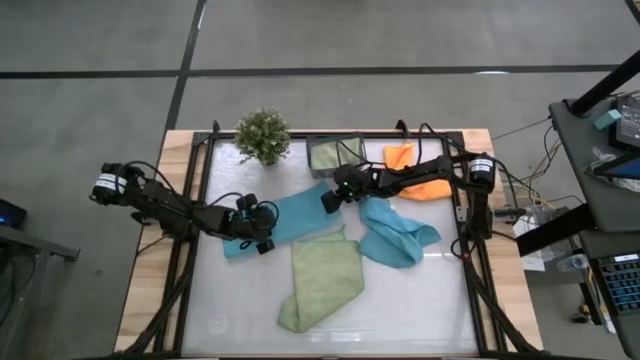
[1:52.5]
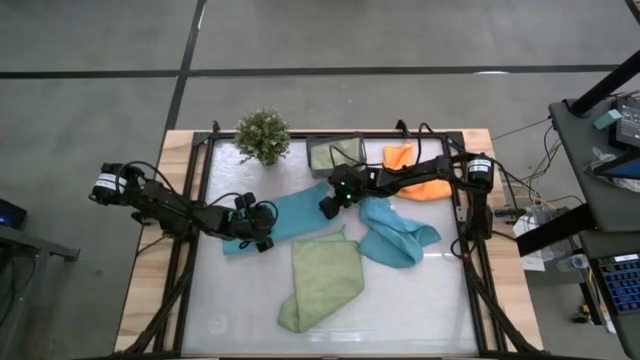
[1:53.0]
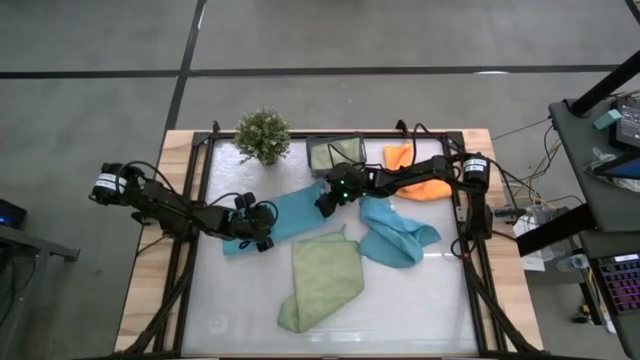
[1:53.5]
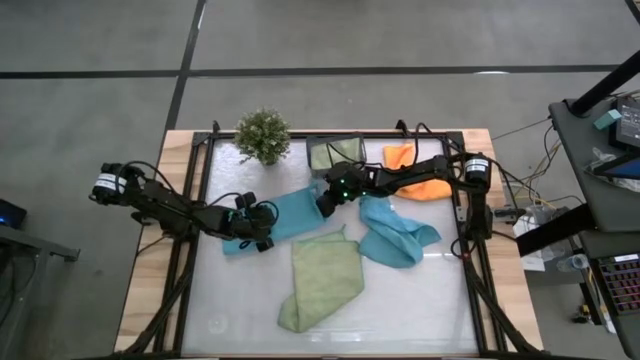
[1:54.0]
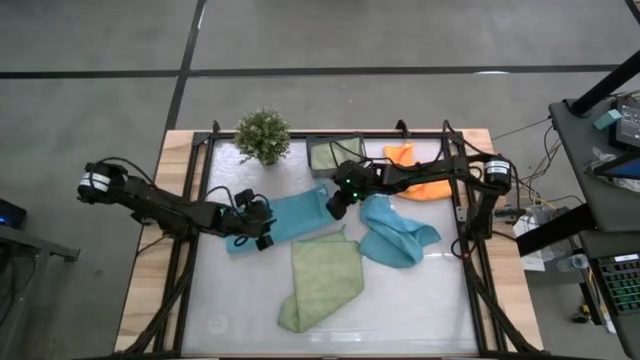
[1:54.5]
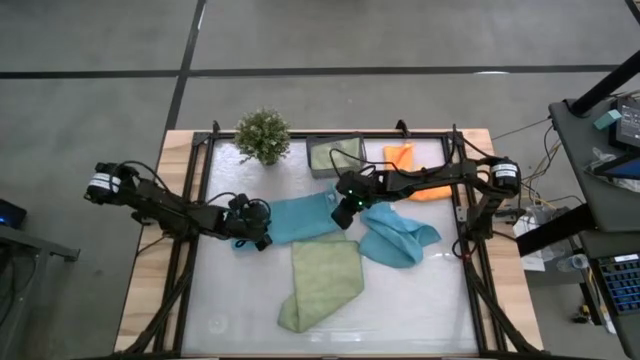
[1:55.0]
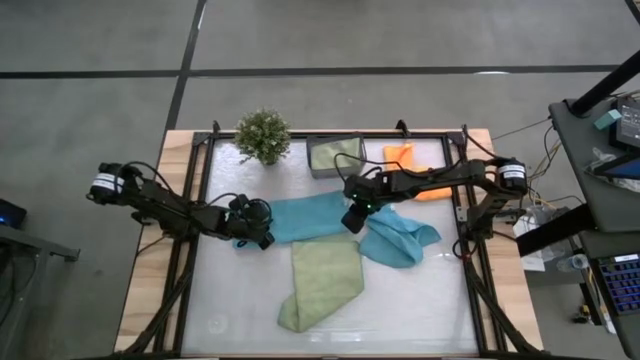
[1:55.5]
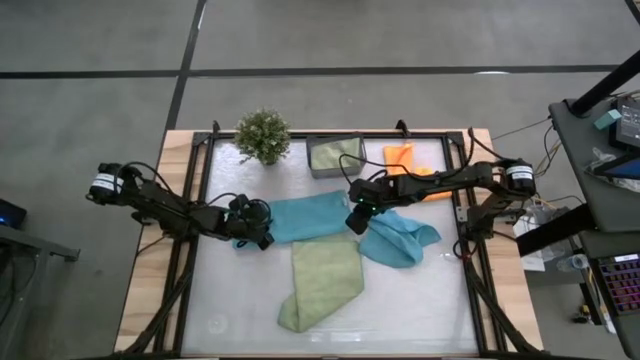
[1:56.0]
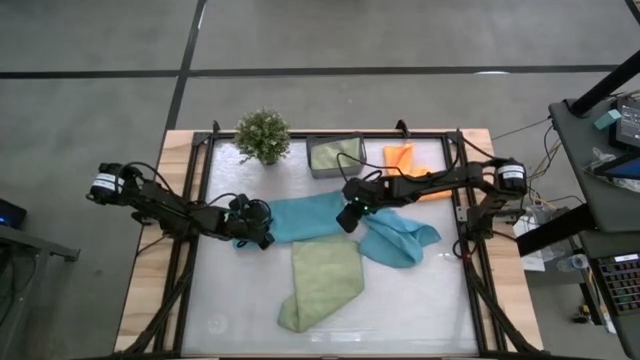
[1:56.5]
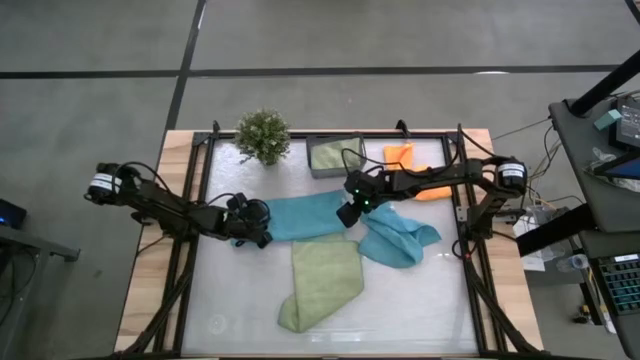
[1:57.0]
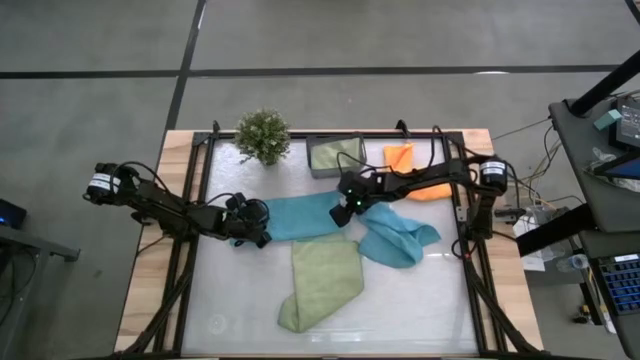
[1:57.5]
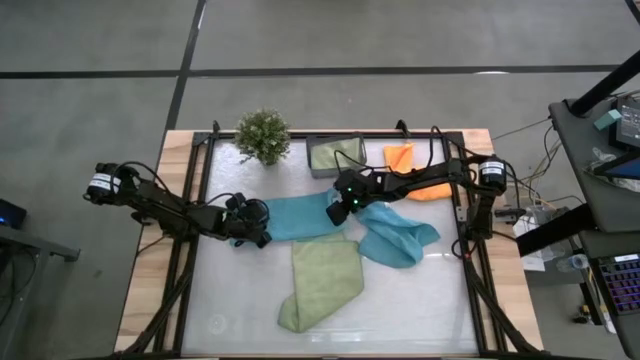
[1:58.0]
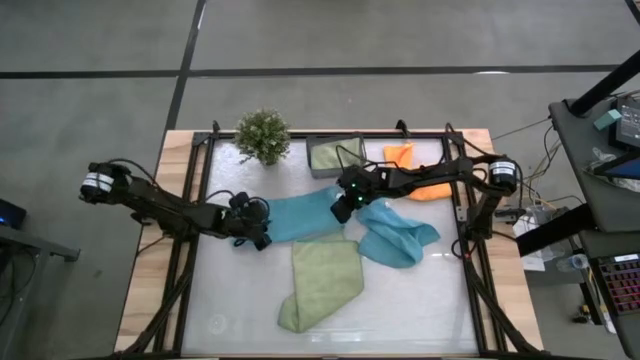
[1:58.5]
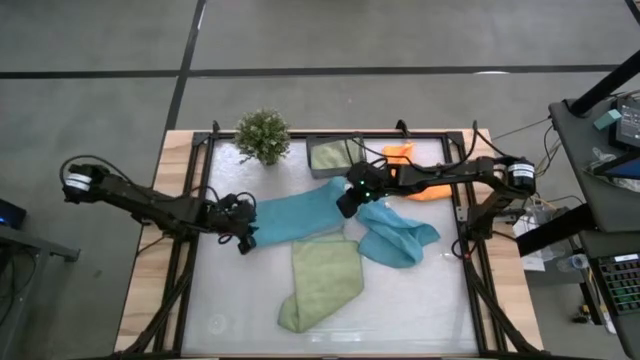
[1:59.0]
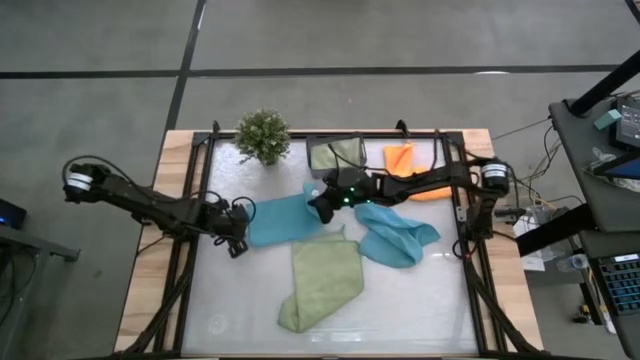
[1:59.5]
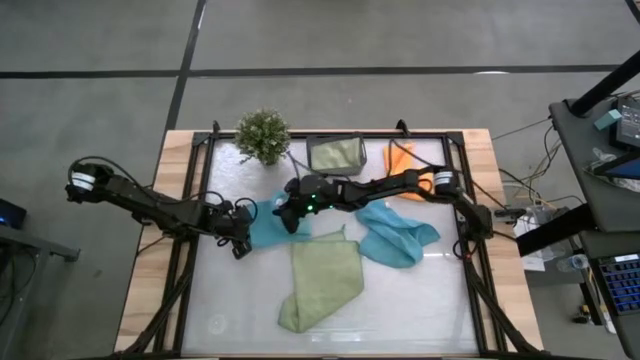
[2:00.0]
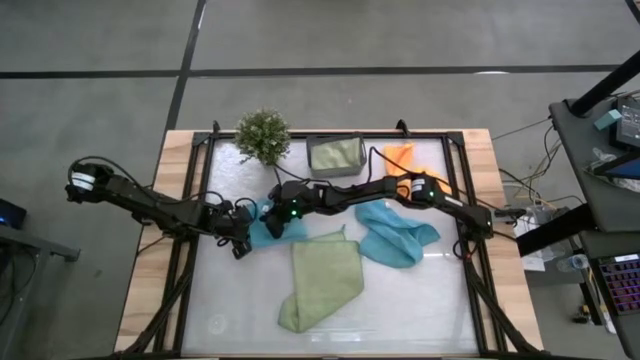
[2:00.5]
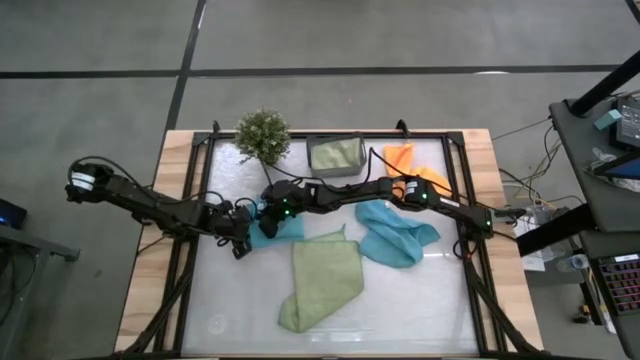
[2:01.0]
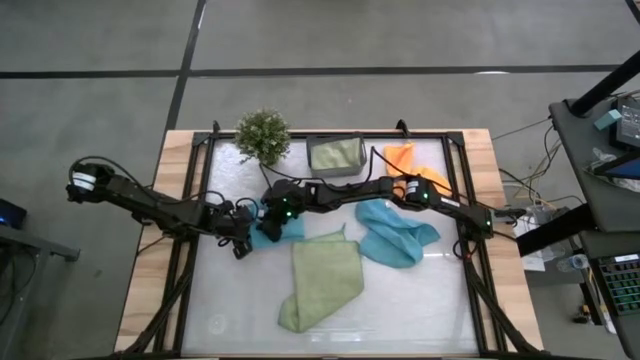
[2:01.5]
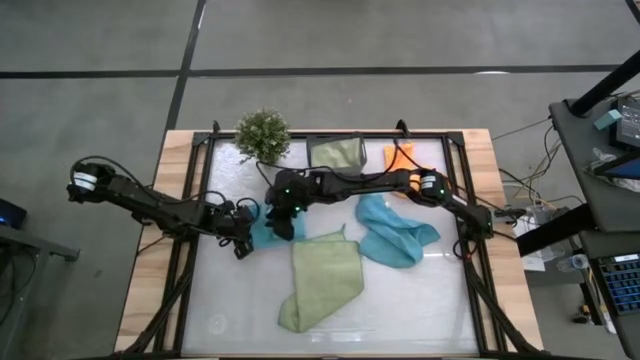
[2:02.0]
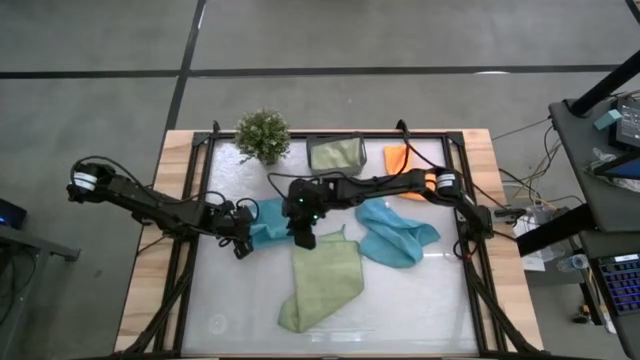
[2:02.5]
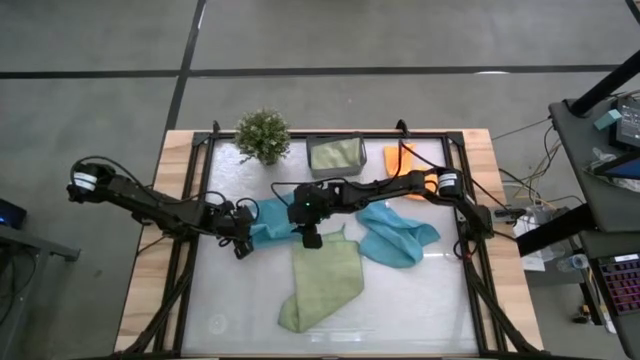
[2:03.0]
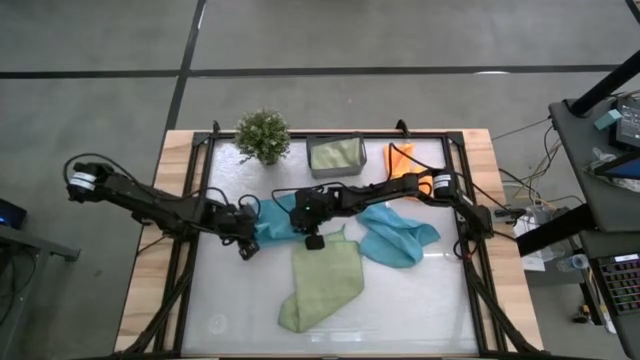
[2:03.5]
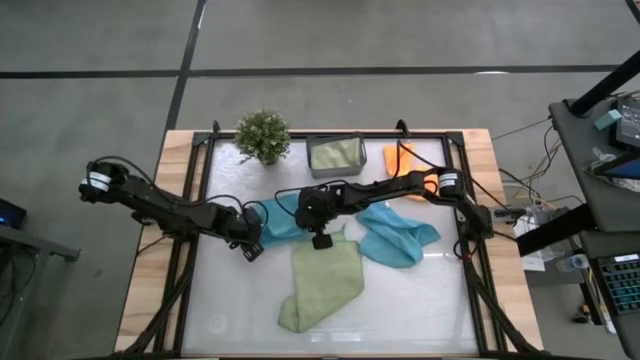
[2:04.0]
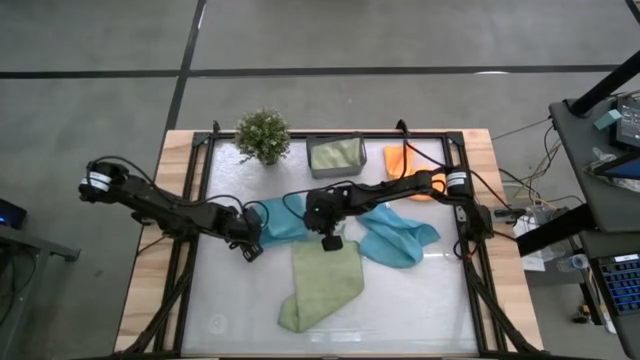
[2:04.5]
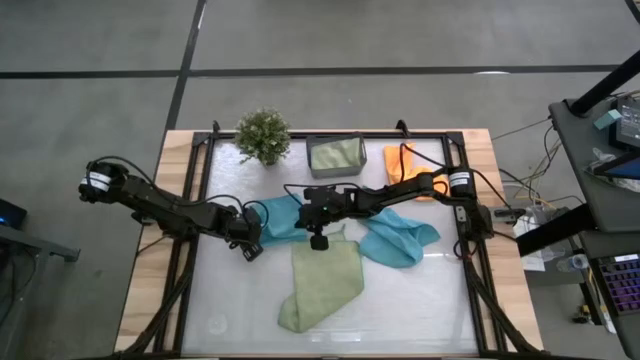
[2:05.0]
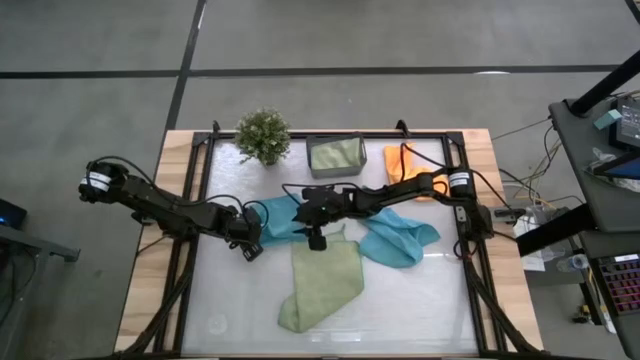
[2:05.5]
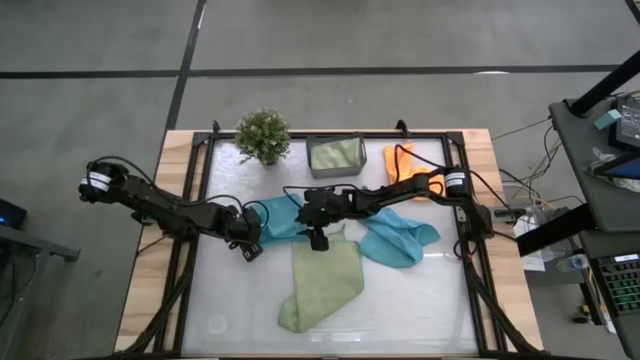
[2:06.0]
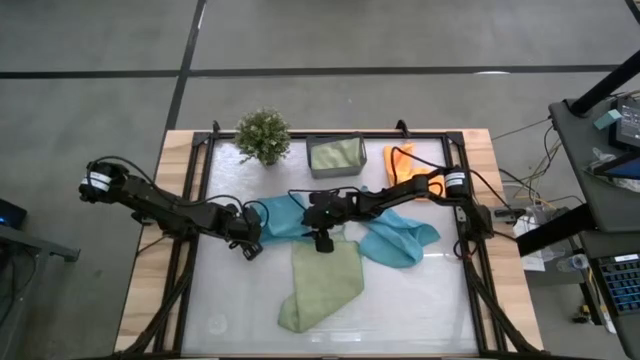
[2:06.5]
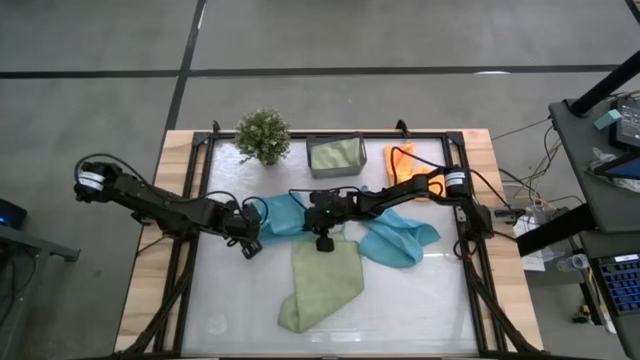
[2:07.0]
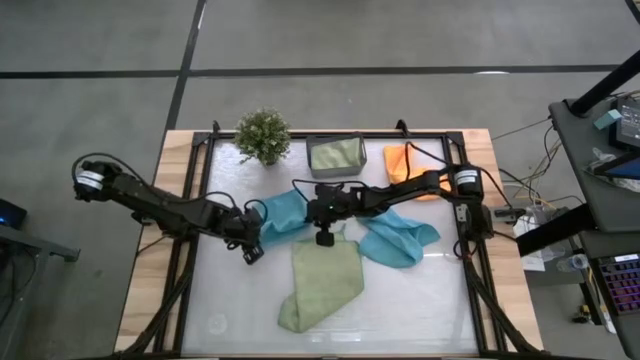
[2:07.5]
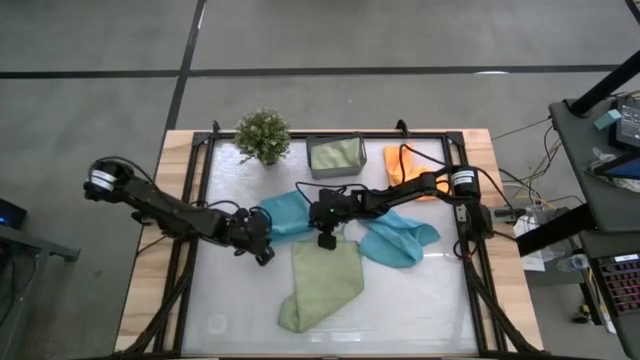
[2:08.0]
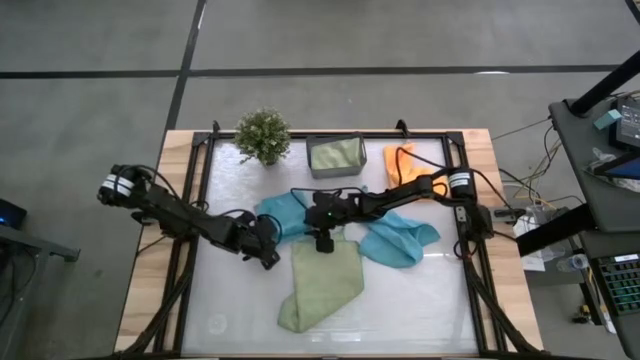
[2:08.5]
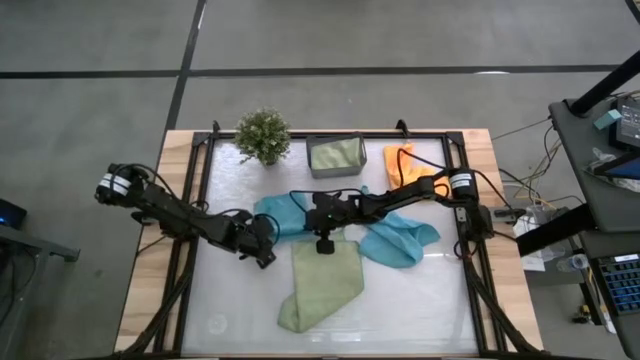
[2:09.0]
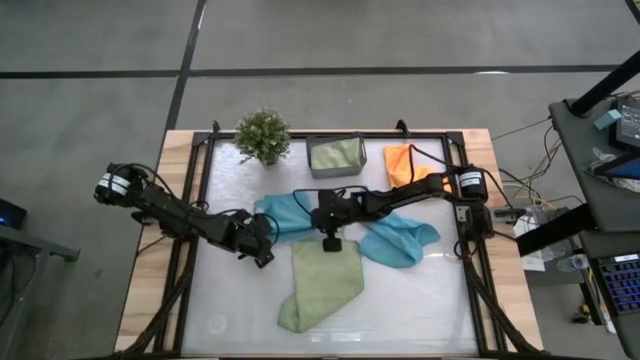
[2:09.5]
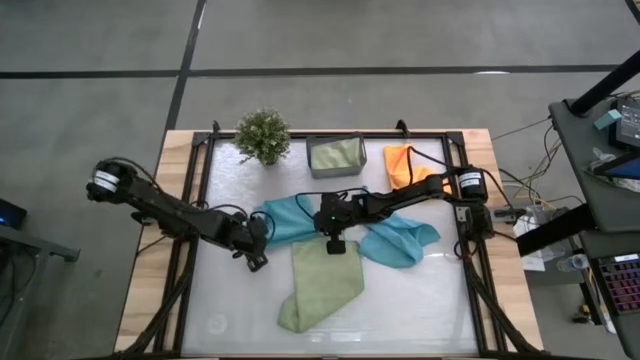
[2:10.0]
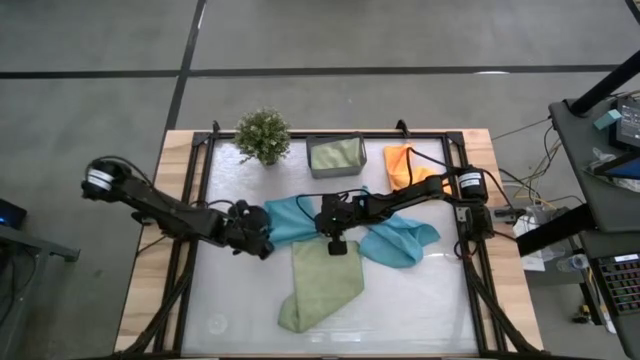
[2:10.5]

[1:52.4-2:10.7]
Task: Fold microfiber towels
Fold the left blue towel

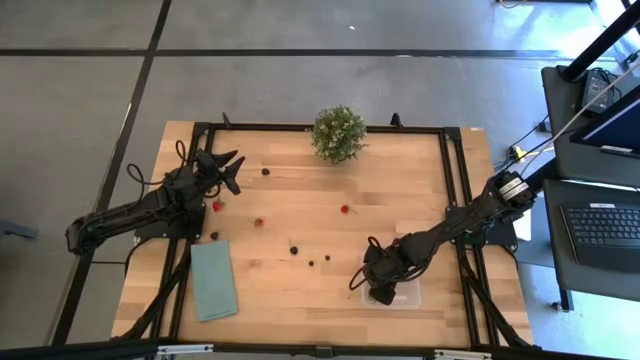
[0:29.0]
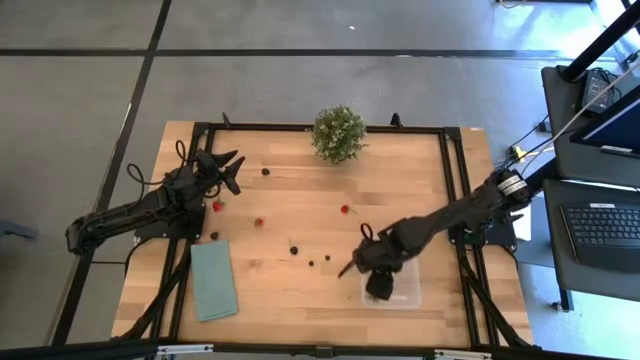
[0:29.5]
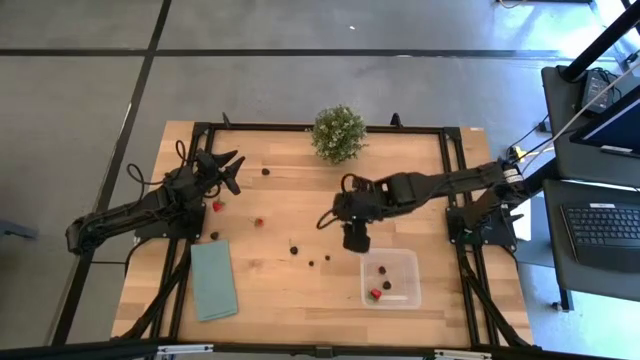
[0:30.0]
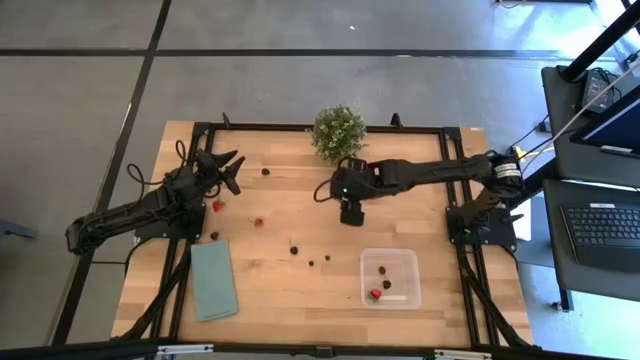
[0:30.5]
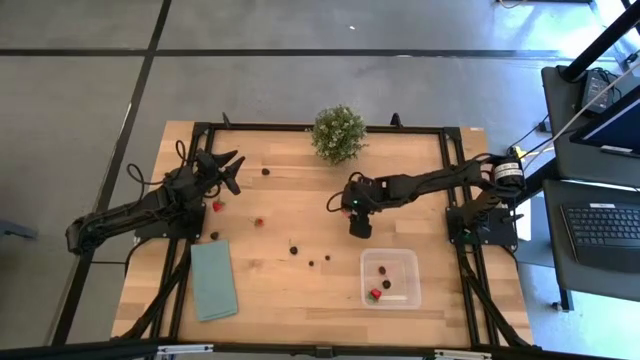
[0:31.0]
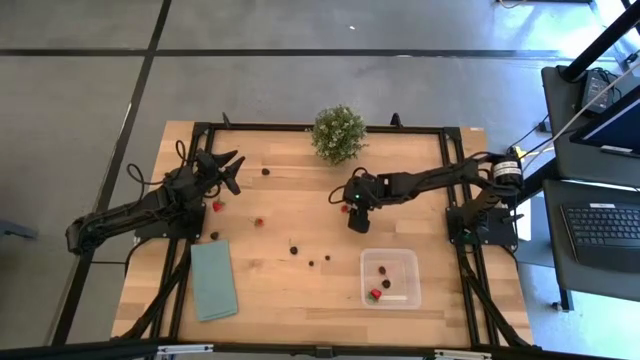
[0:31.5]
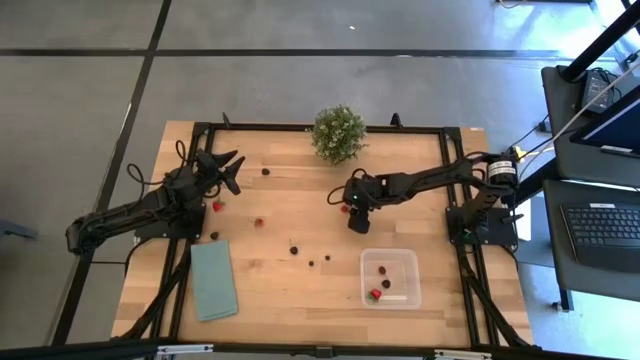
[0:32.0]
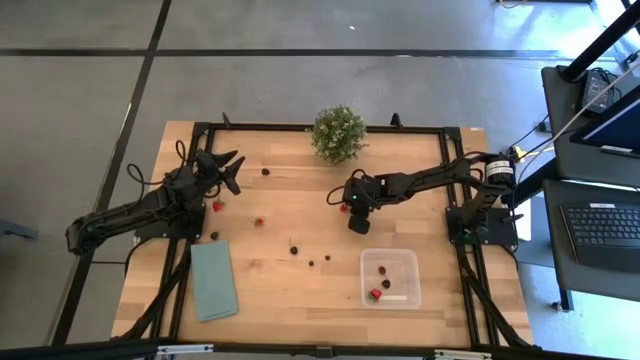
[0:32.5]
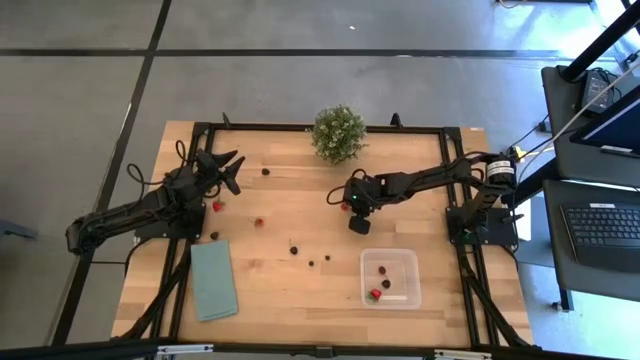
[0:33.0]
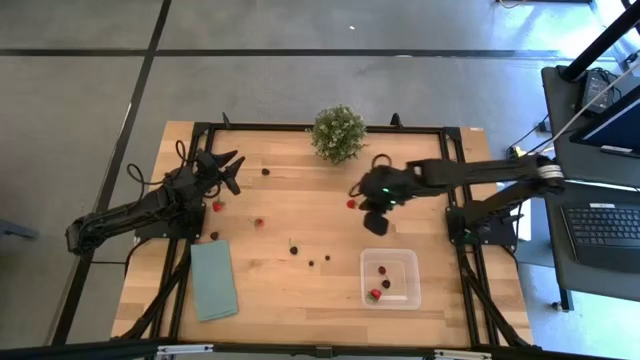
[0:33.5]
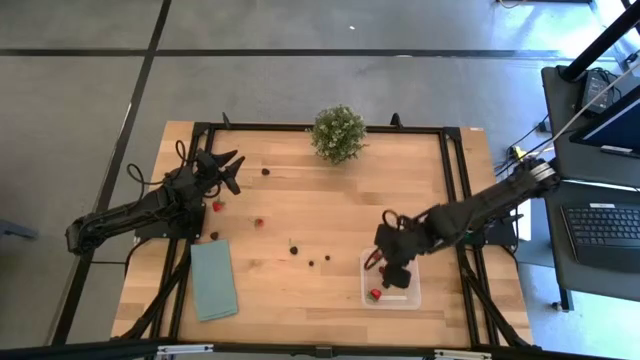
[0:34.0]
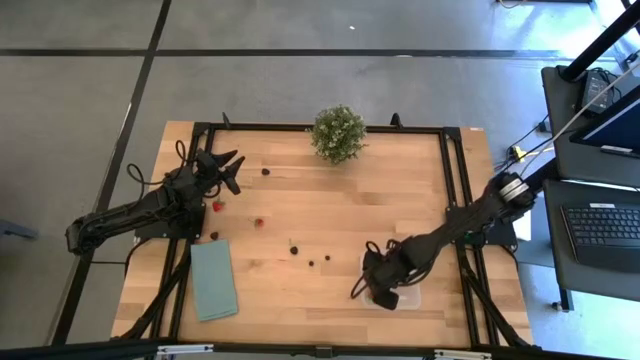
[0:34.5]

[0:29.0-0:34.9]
Task: Pick and placing Produce into tupperware
Put the top right strawberry into the bin
